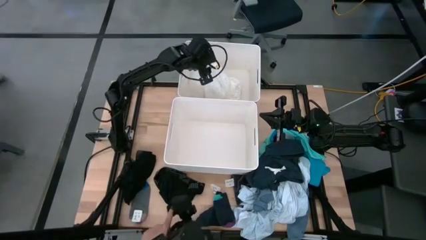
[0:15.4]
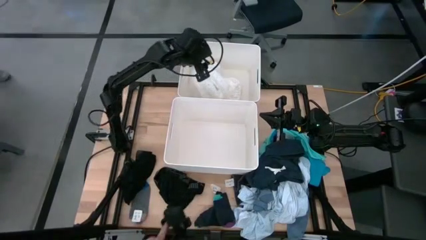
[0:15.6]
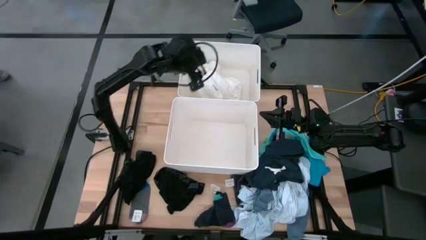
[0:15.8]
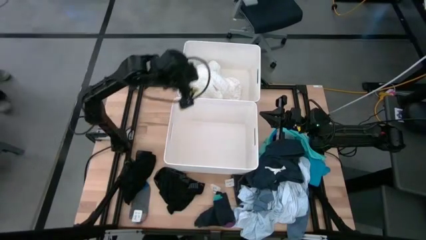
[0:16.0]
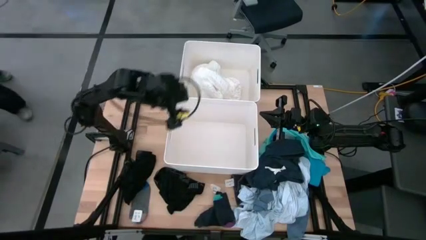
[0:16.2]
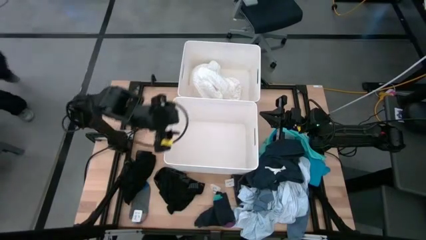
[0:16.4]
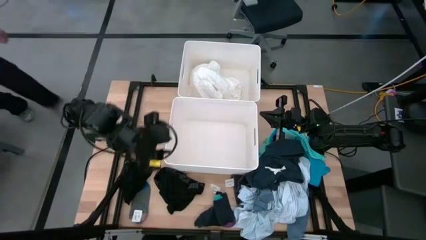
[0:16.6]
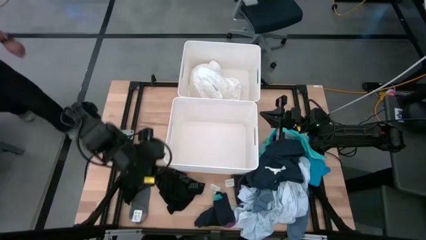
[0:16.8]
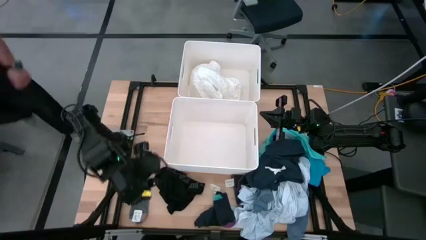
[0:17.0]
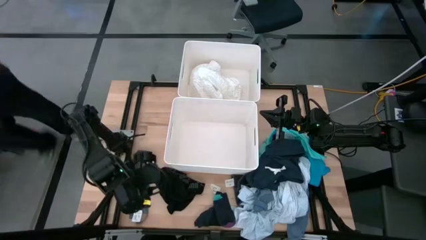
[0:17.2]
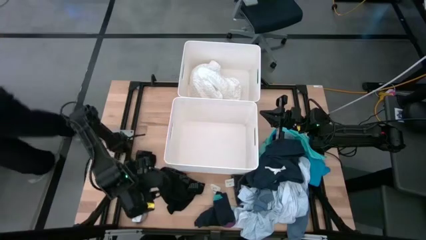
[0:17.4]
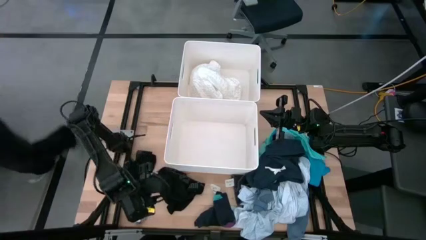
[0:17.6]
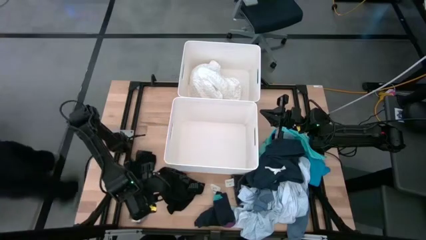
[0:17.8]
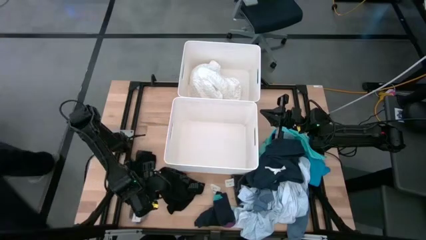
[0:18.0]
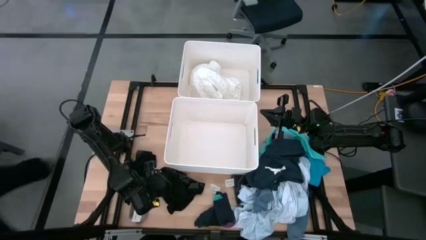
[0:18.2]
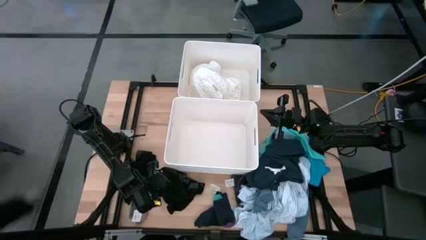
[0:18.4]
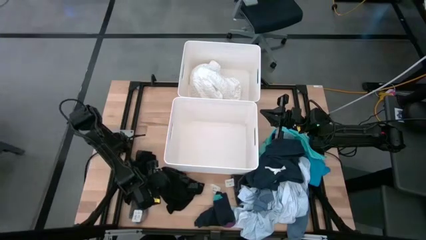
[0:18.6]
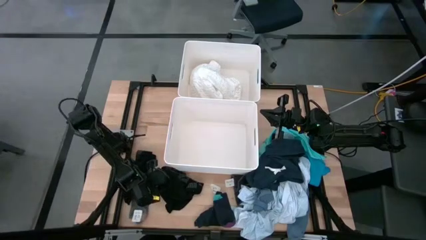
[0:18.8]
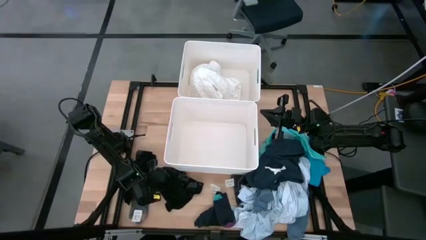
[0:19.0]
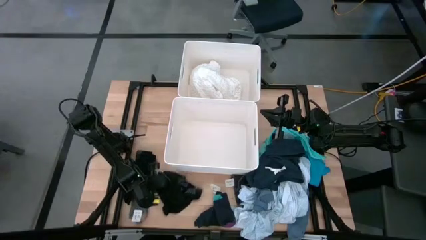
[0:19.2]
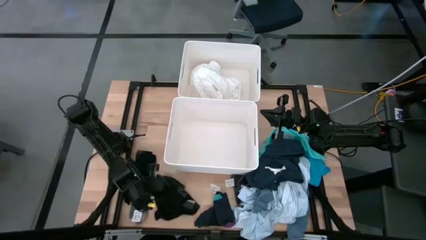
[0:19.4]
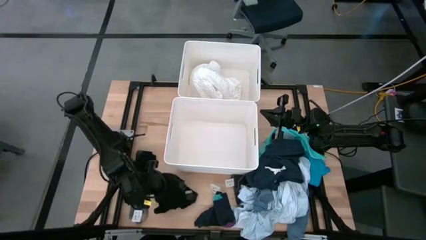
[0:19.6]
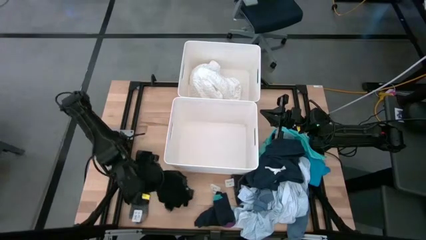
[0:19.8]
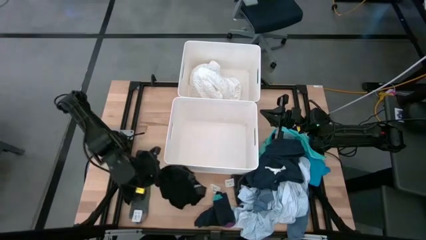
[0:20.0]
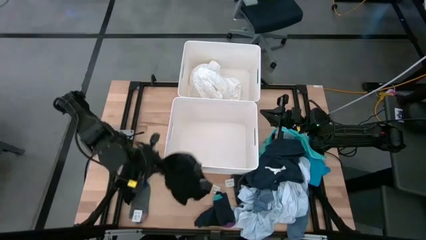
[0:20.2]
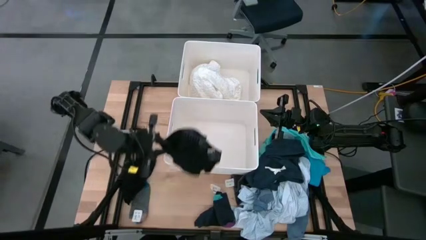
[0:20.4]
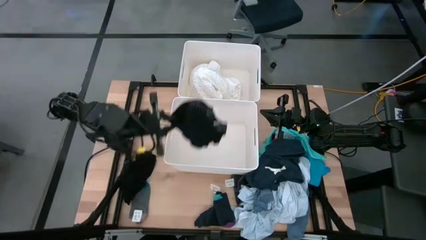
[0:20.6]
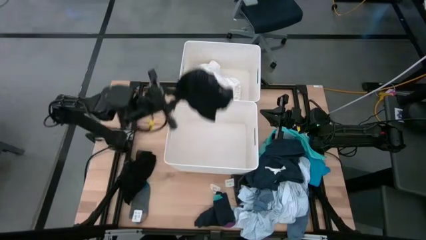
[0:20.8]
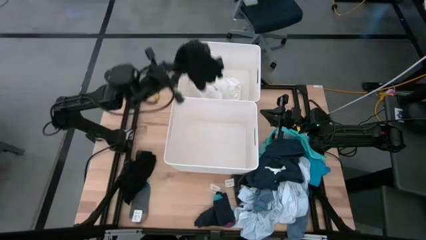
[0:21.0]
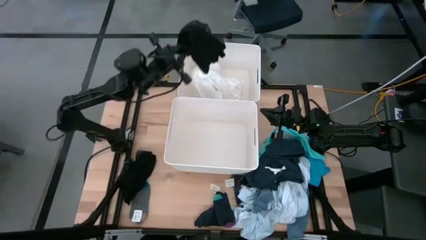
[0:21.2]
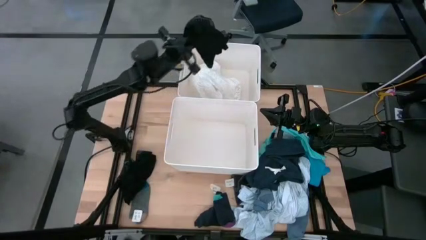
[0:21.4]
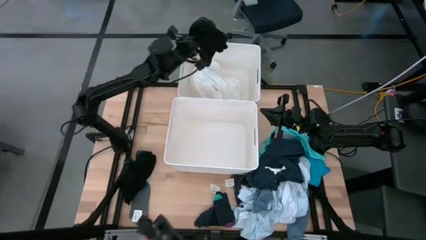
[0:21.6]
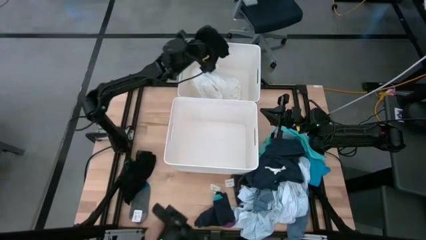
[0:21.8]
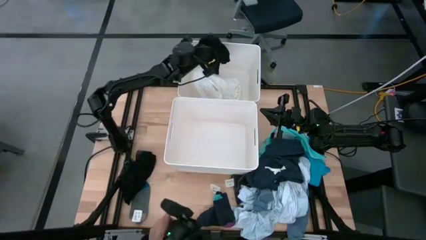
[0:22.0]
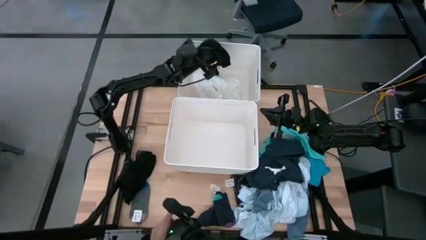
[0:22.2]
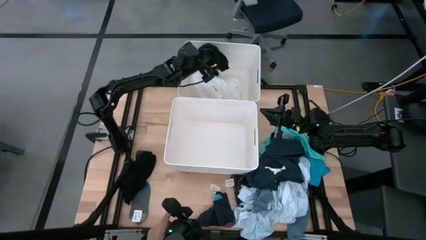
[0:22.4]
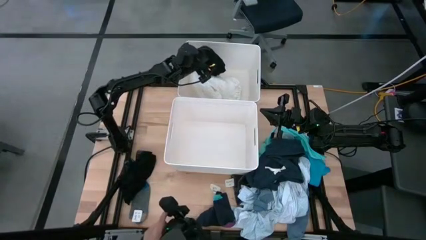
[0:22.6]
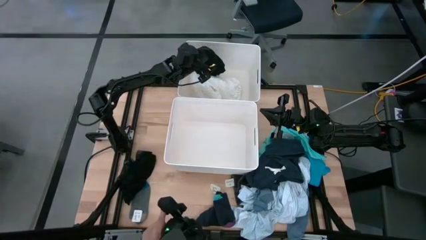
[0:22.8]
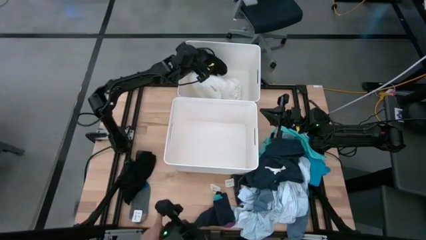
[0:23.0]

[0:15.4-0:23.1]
Task: Sort clothes
Put the right black underwear into the top white bin

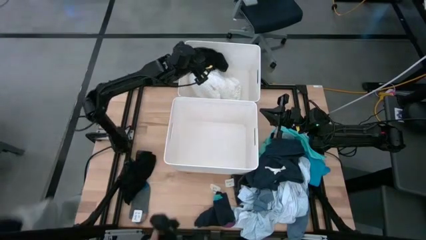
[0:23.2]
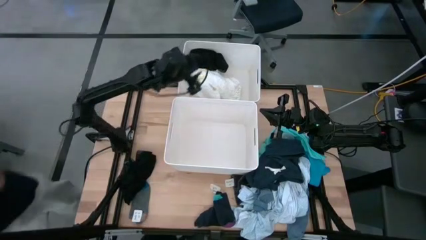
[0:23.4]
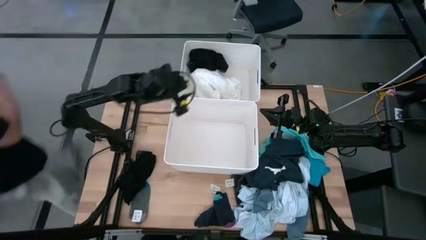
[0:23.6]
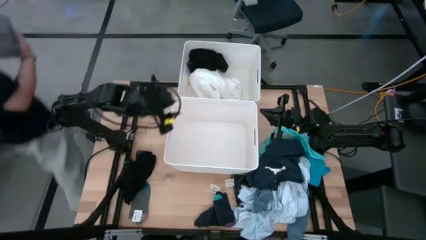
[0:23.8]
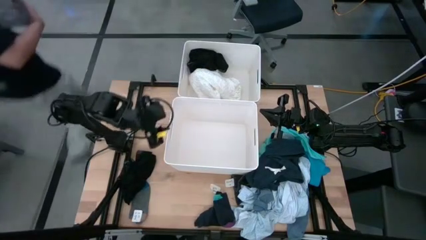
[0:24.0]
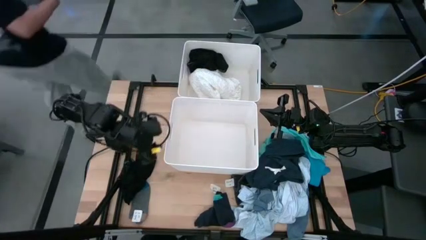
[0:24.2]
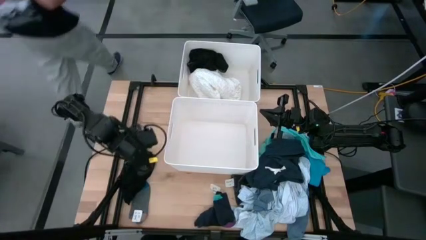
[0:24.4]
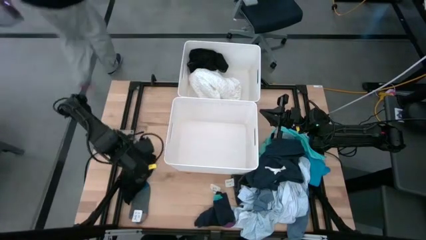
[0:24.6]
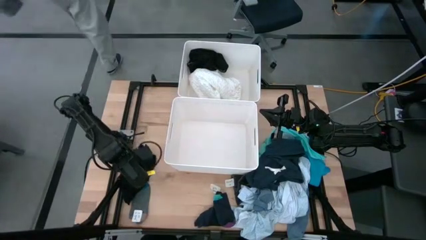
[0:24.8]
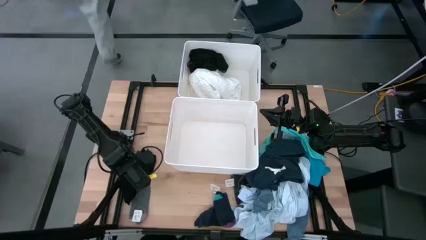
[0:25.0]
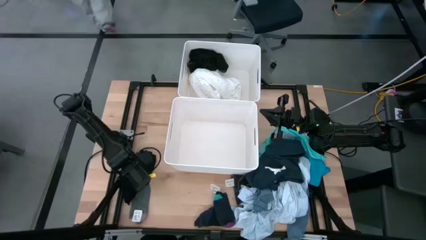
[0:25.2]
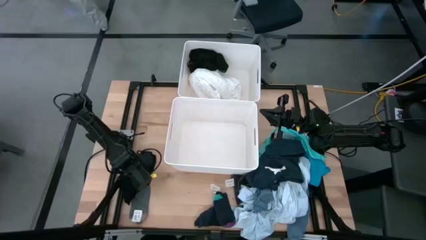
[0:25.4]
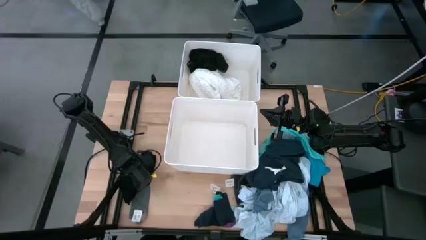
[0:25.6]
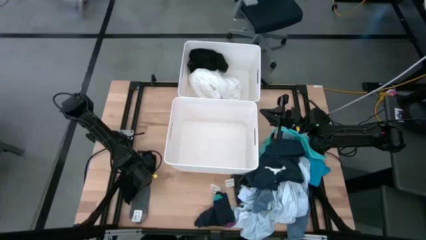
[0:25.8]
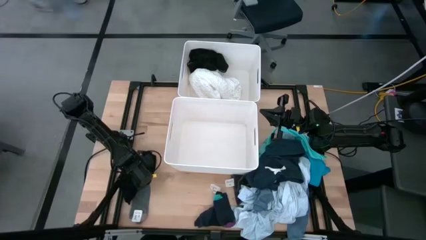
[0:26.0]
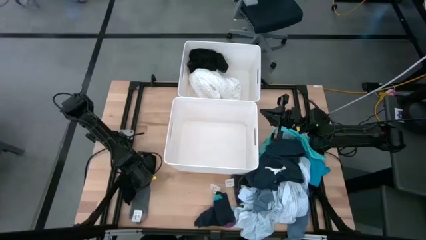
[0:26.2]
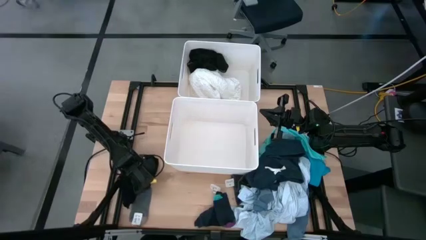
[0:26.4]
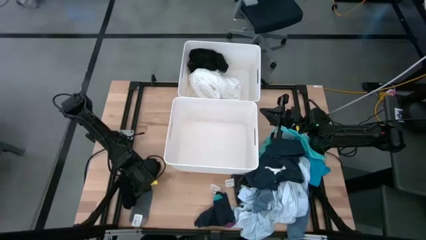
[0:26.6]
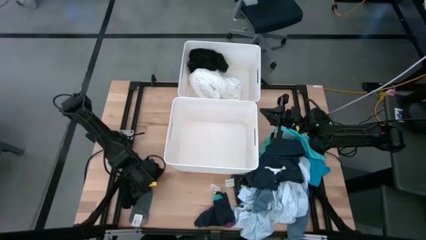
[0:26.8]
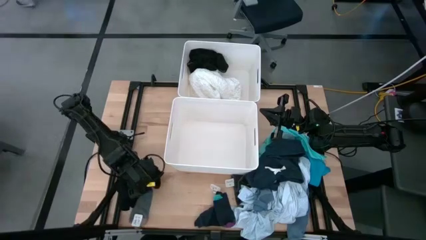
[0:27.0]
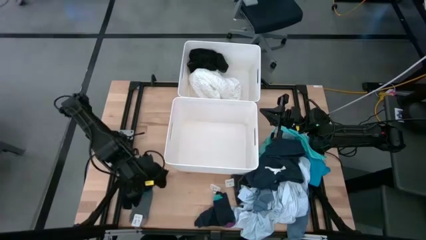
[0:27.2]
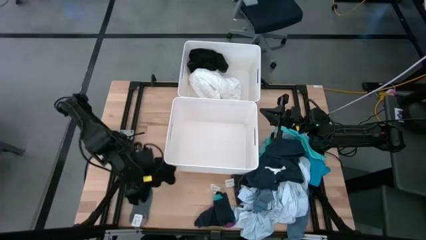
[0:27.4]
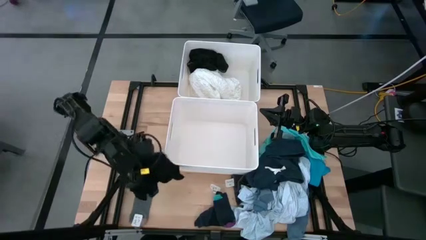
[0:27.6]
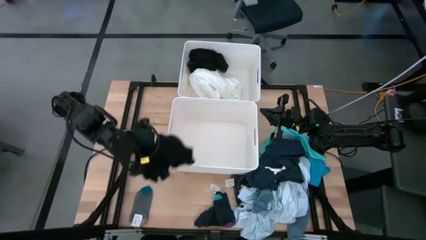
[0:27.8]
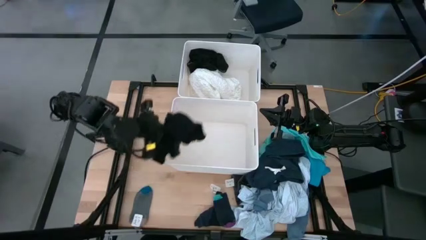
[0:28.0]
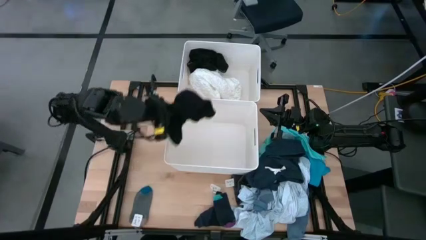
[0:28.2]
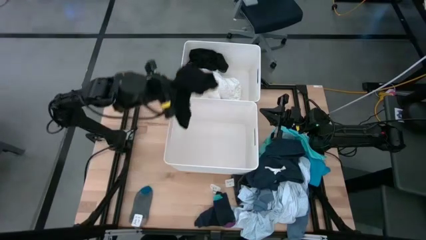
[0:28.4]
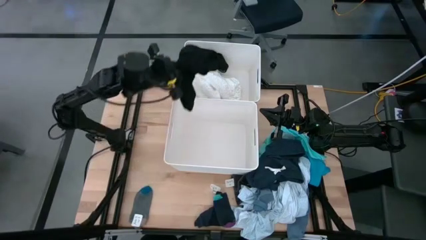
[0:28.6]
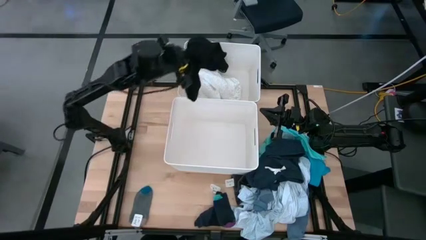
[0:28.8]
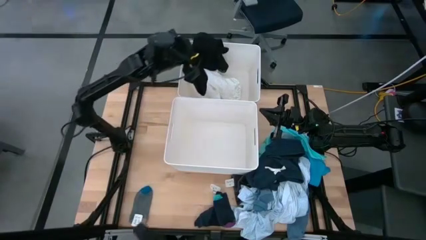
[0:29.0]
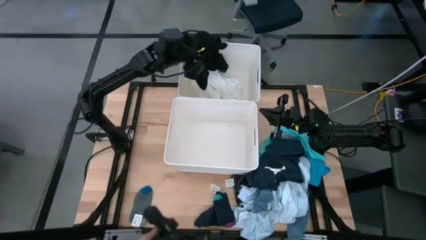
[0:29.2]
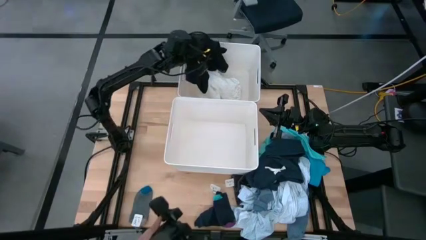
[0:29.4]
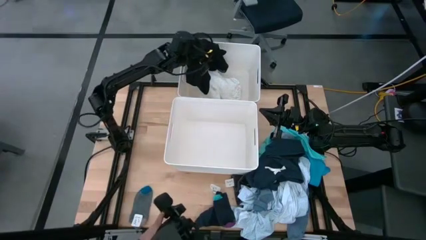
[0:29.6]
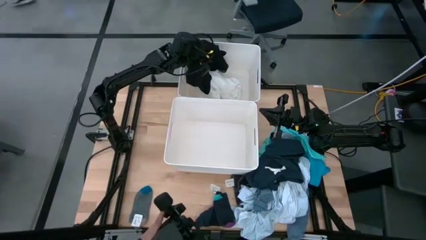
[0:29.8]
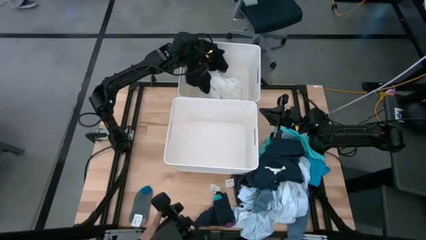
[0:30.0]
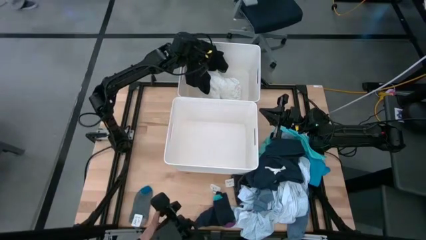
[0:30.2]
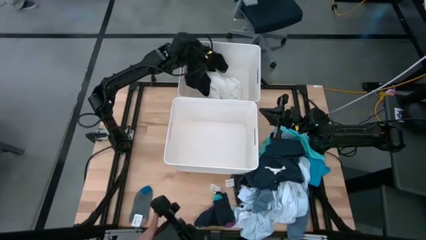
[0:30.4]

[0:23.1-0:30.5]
Put the black underwear into the top white bin
